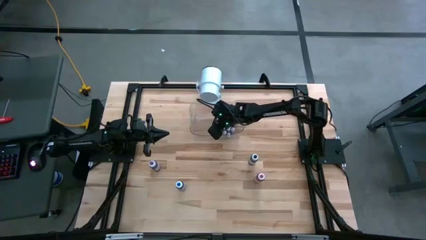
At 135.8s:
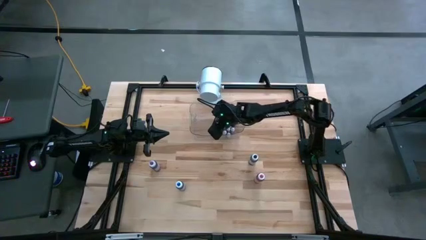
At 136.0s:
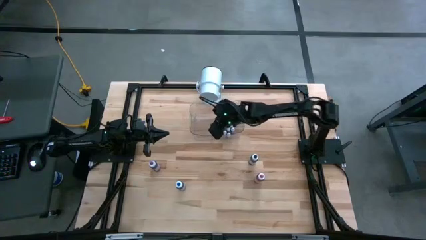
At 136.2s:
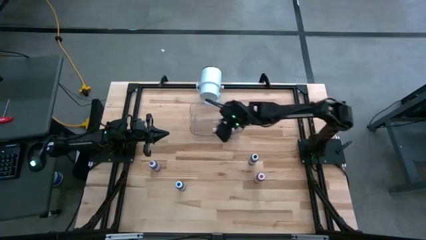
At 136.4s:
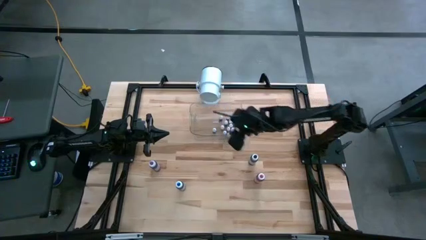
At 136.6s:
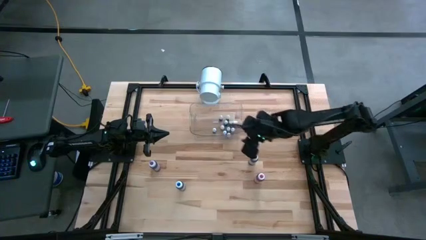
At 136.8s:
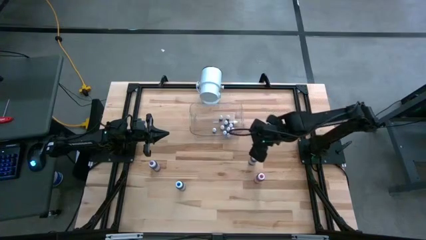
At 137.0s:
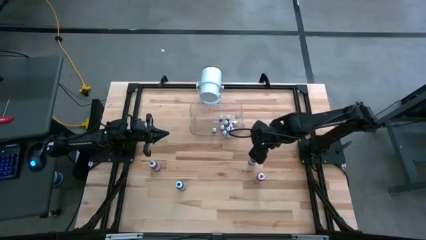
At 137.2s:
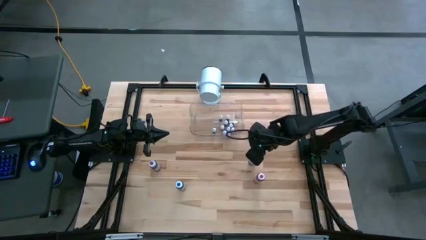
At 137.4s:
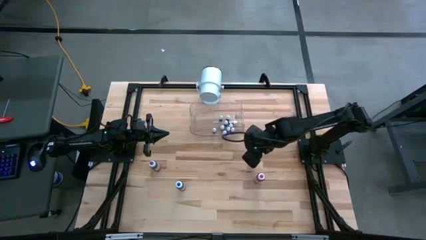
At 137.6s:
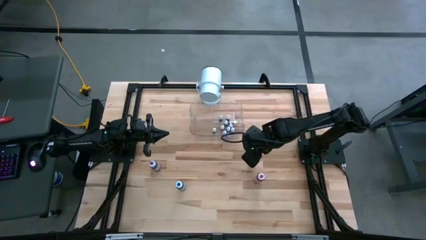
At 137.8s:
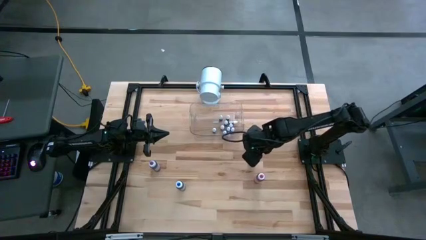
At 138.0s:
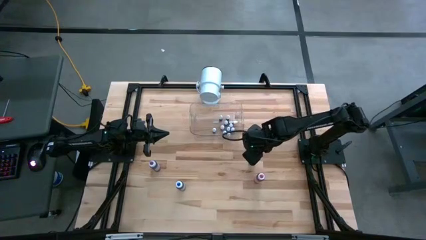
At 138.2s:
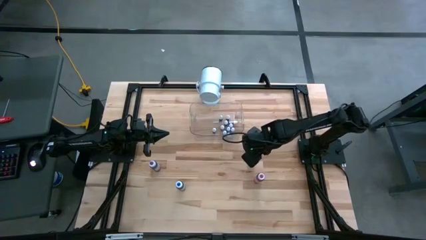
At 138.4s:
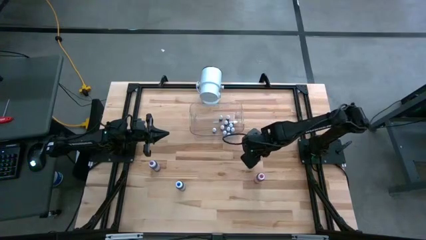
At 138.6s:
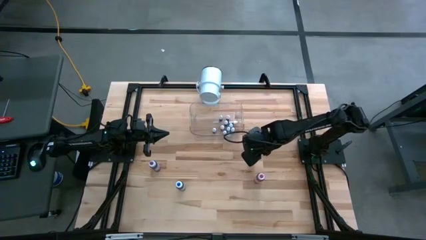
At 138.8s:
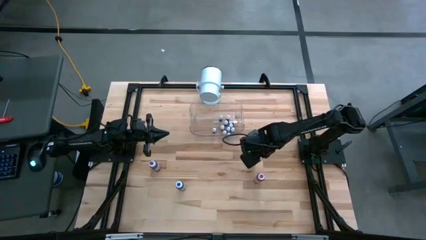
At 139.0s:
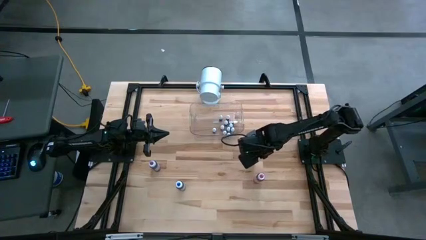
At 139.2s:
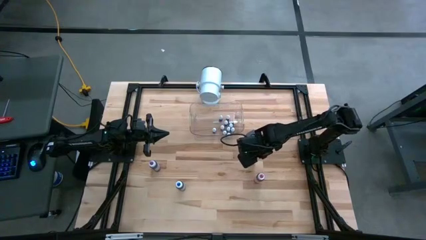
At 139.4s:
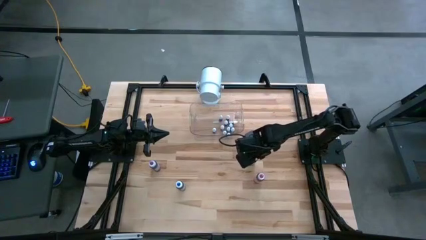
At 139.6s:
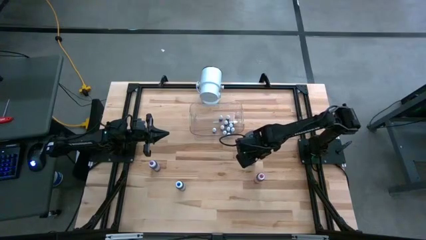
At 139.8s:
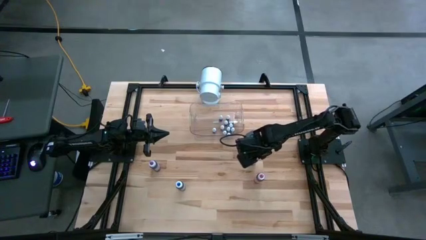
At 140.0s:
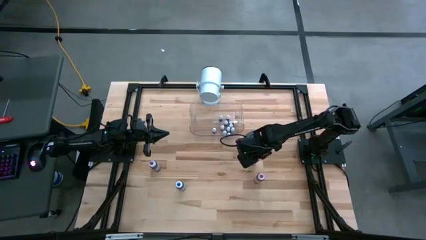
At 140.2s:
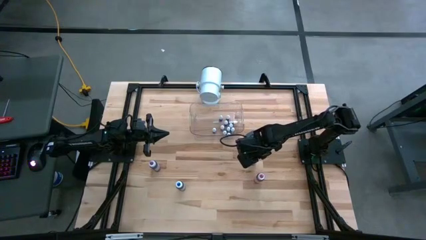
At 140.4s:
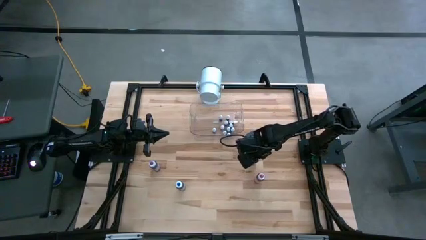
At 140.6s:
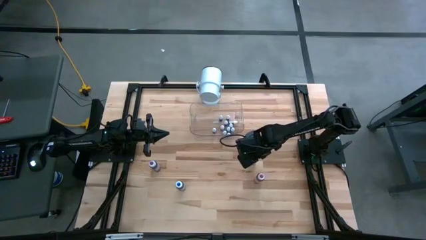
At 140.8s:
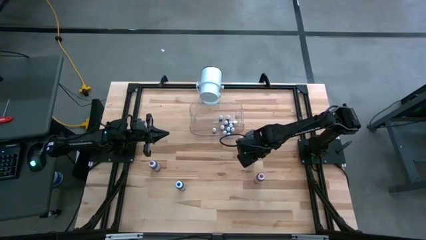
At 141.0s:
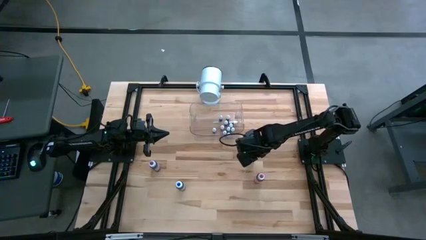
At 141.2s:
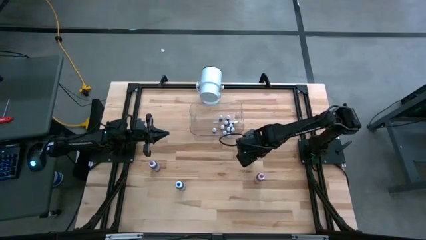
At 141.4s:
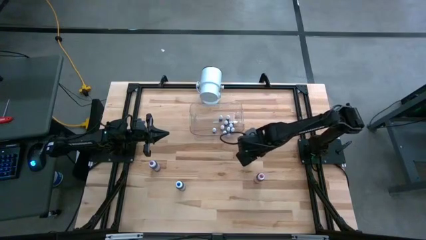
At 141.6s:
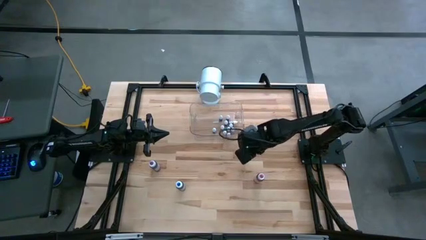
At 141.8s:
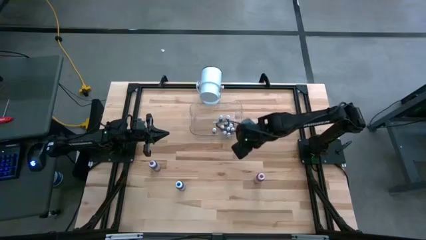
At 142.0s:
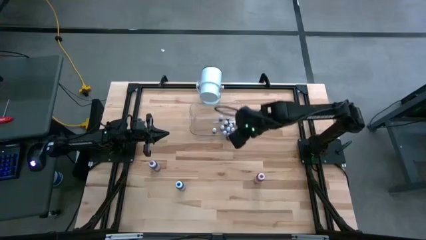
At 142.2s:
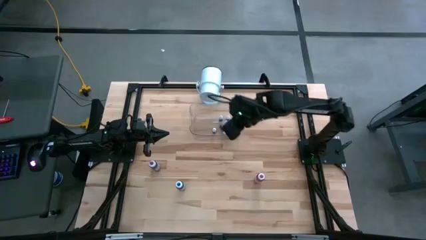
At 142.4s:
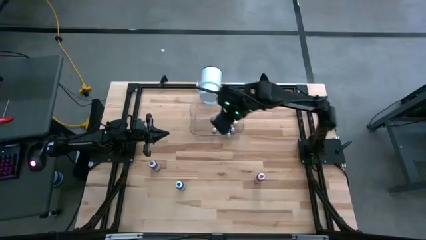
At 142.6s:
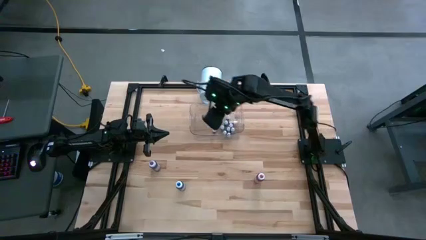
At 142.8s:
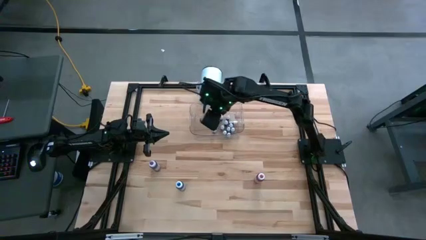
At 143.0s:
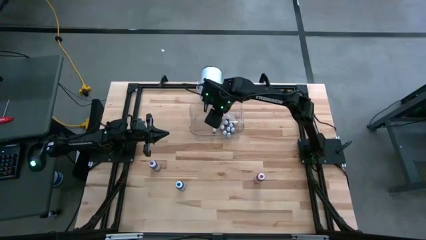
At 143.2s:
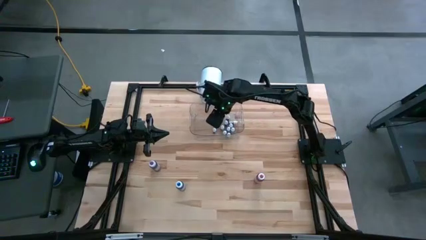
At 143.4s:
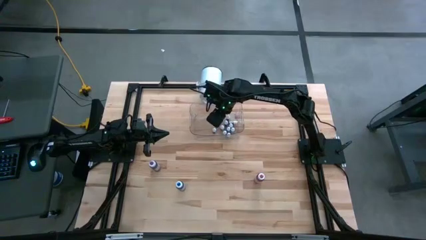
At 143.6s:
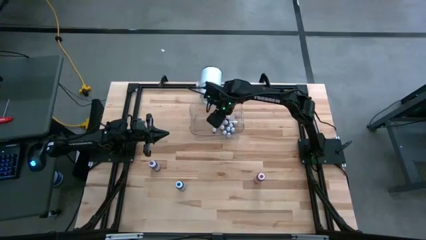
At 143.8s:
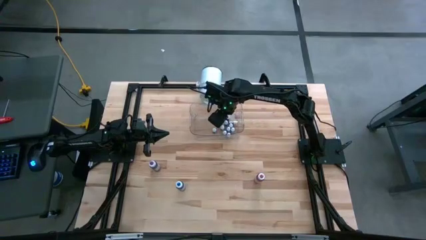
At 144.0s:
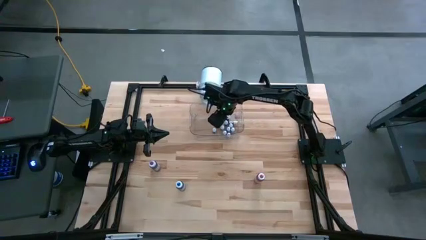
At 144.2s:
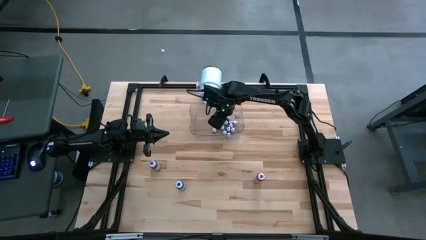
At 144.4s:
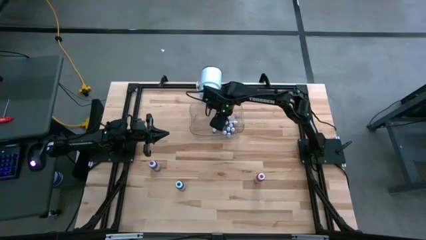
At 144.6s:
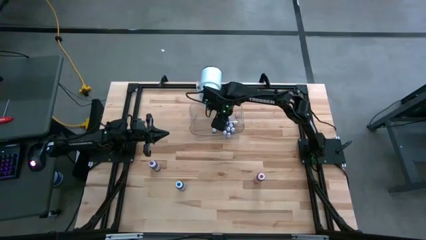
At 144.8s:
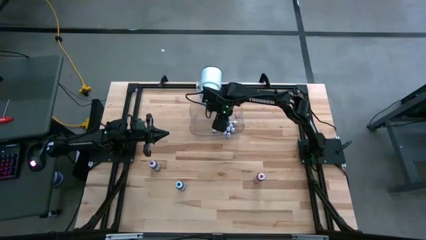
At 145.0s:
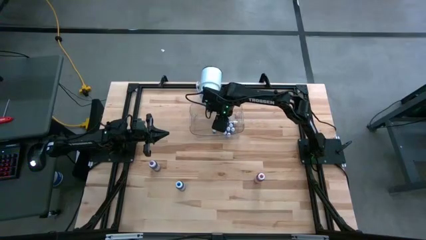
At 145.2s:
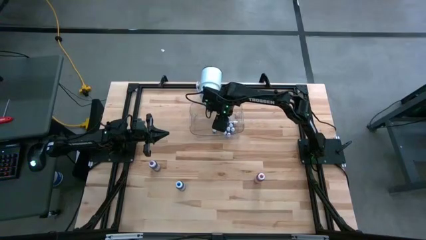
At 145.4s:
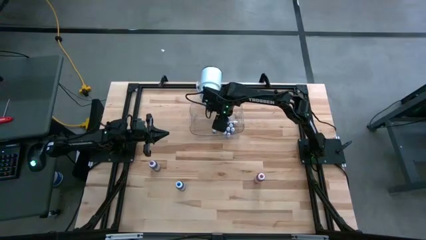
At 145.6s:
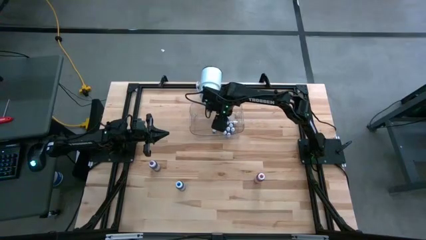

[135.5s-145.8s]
Task: Pick & Place food coloring
Put the large black food coloring bottle into the transparent bin

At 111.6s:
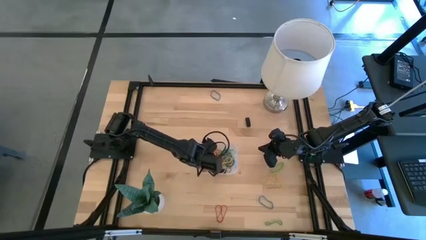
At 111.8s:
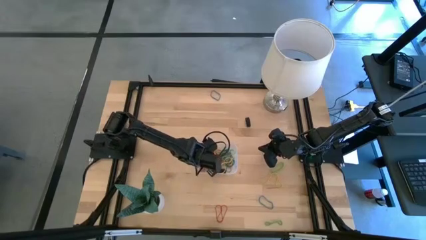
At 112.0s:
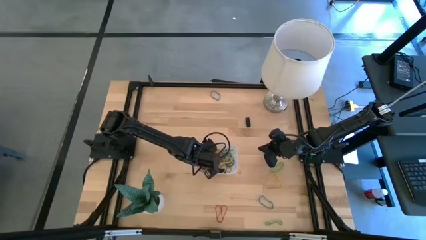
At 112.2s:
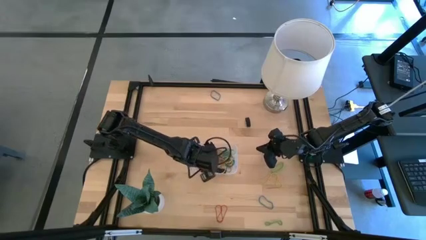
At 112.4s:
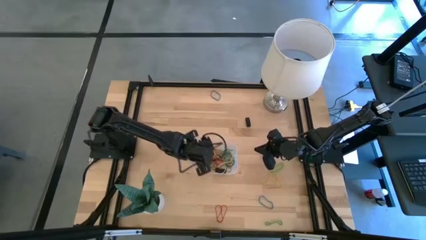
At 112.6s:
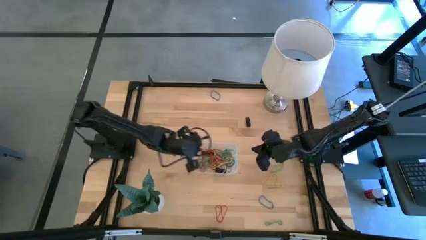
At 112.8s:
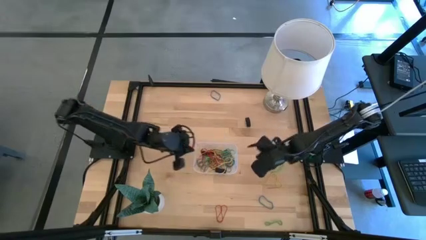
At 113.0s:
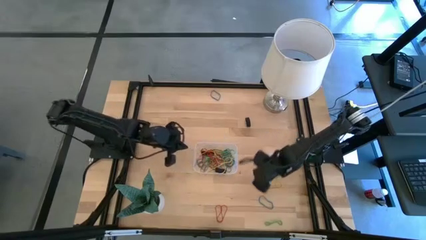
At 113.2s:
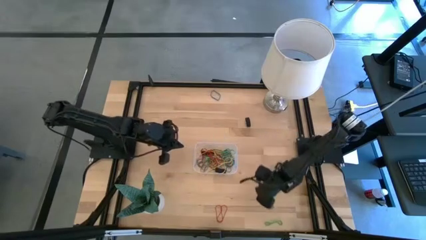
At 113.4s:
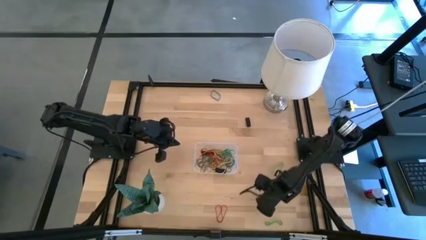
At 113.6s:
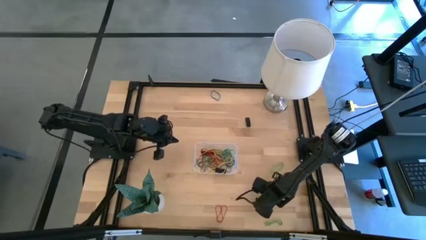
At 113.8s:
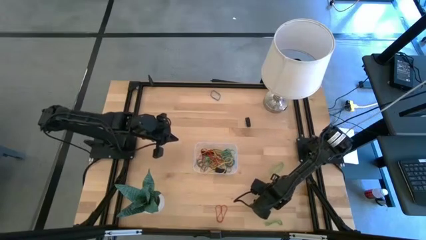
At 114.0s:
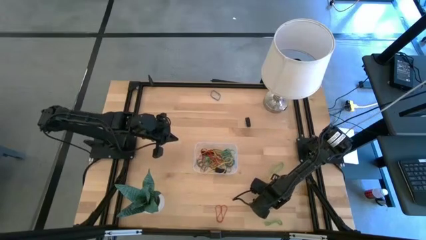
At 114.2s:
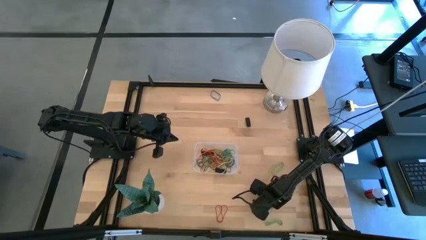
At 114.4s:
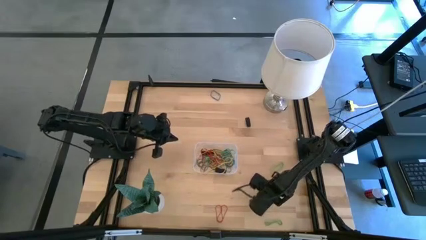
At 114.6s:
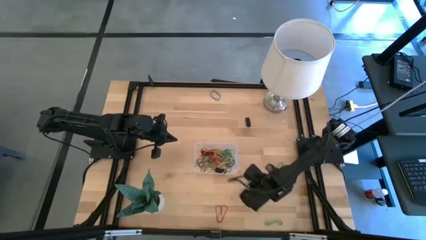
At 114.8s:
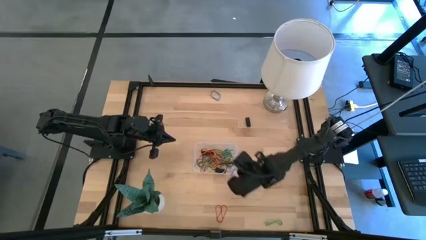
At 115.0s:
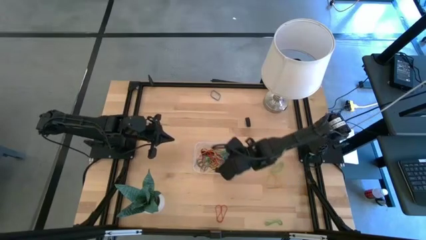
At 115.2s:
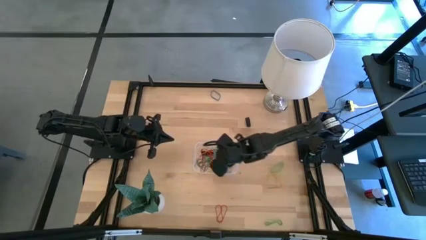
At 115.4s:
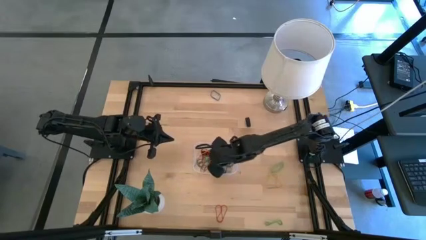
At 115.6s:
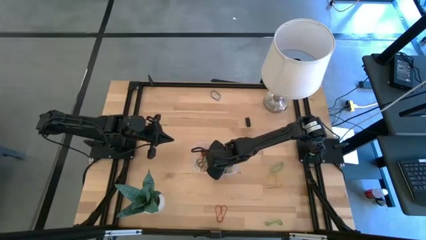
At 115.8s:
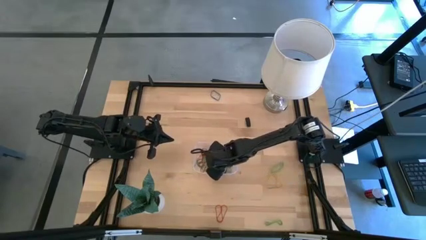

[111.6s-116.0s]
Task: Pick and place rubber bands into bin
Put the blue rubber band into the transparent bin

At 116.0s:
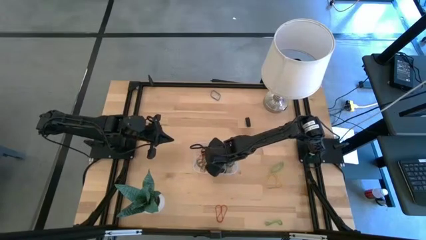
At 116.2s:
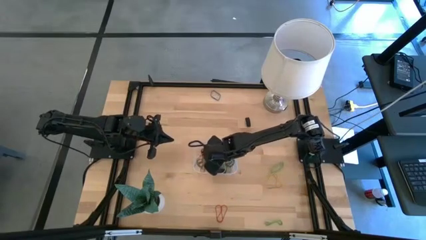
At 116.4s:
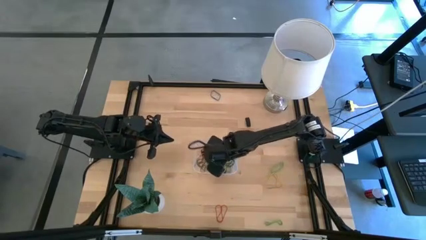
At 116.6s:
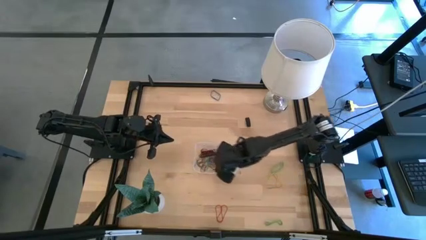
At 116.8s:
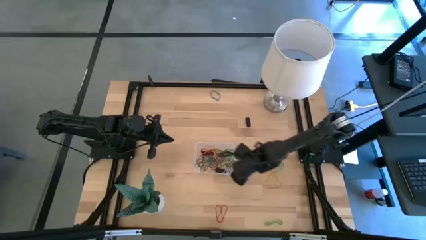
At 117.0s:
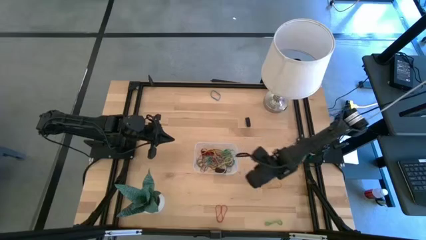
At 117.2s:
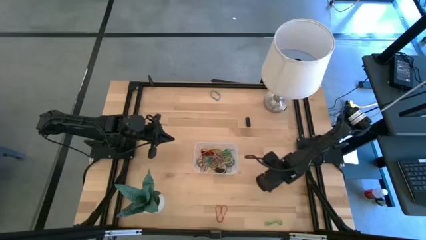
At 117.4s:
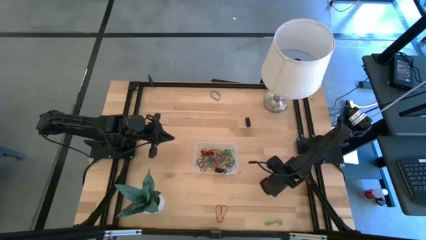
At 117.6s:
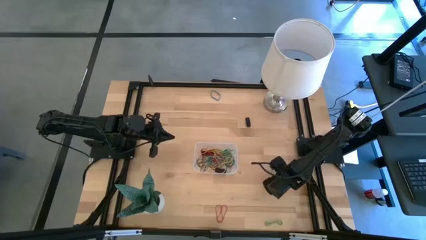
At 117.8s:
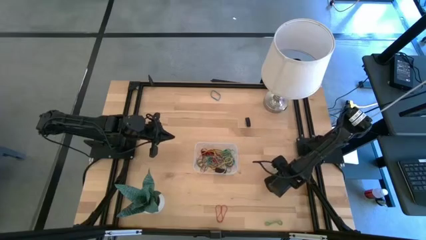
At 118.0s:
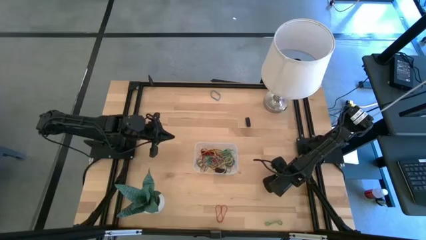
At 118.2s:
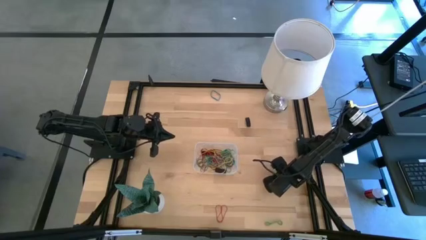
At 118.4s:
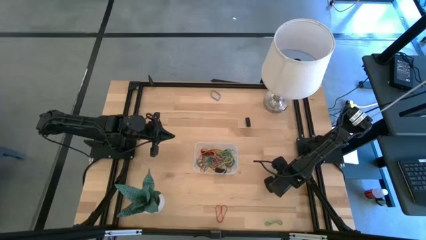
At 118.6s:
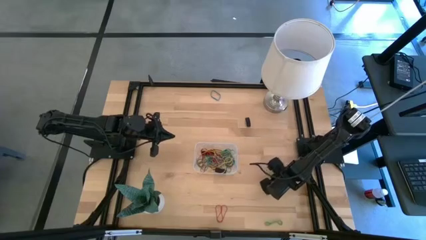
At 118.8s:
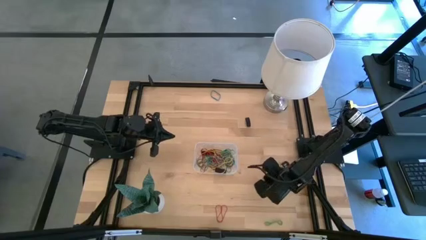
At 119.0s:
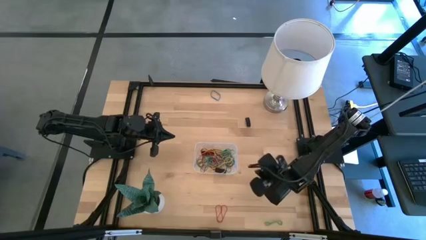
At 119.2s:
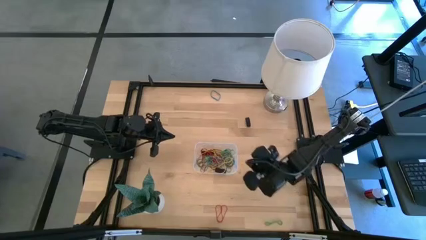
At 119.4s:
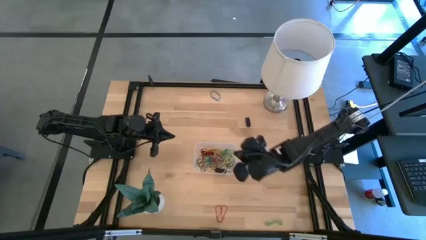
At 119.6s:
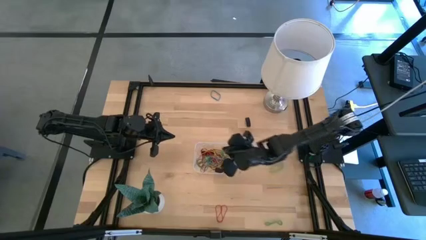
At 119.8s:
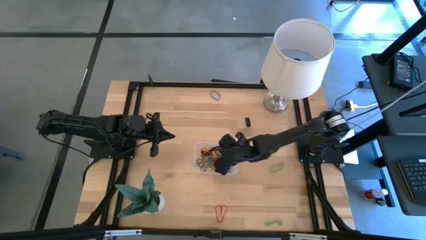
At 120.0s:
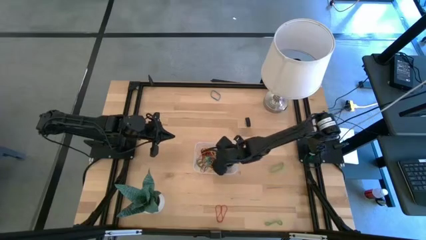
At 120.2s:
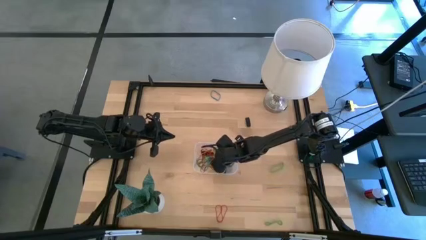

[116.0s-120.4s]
Put the yellow rubber band into the transparent bin
